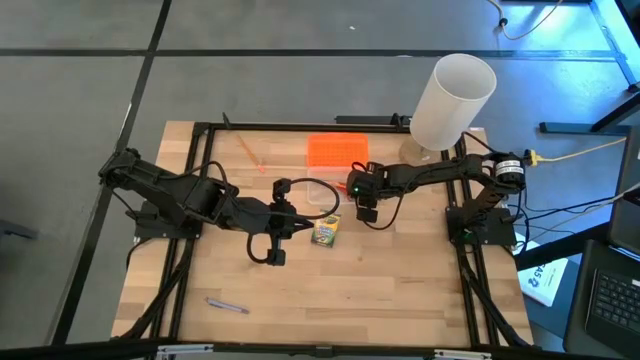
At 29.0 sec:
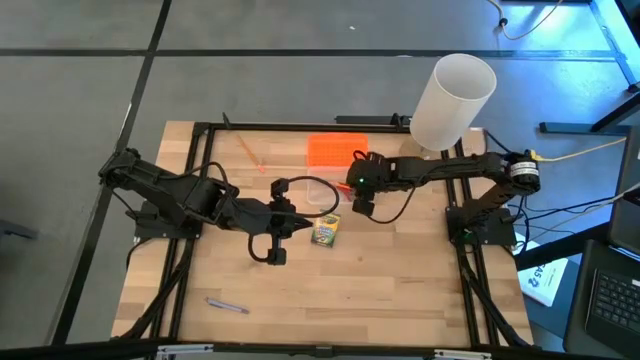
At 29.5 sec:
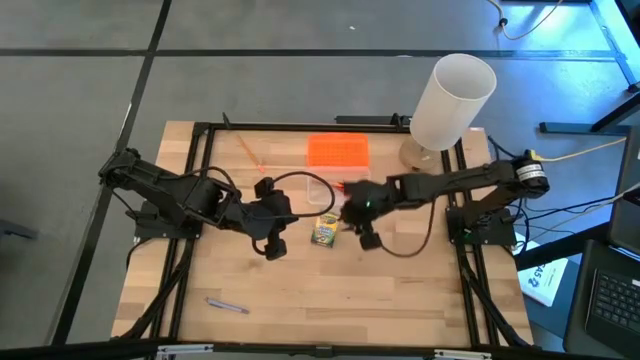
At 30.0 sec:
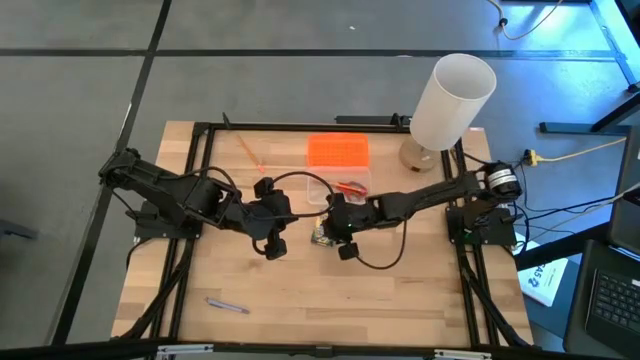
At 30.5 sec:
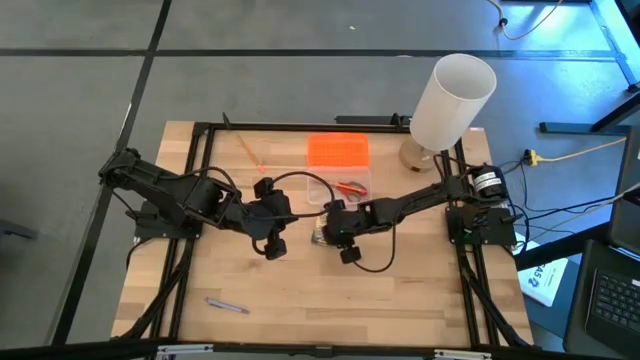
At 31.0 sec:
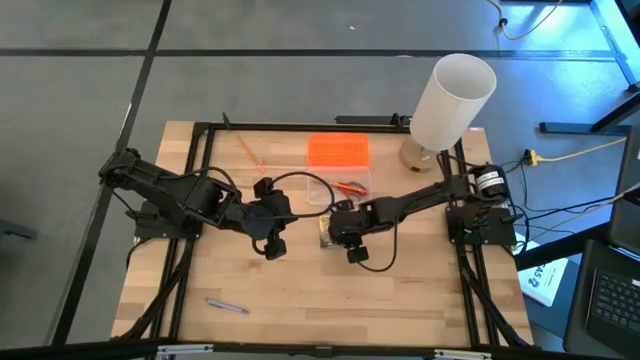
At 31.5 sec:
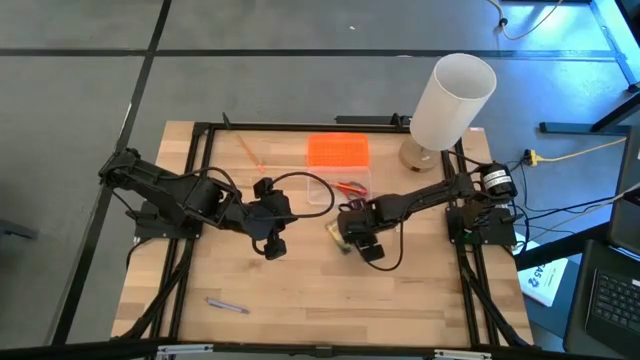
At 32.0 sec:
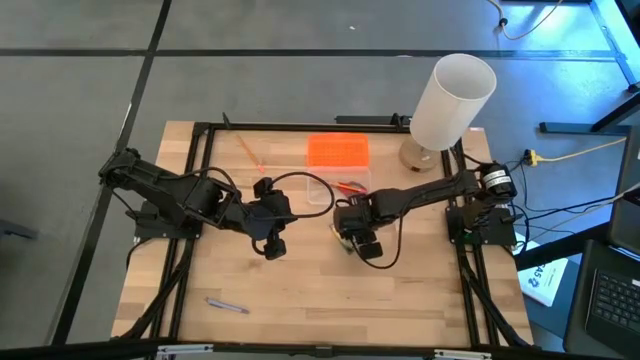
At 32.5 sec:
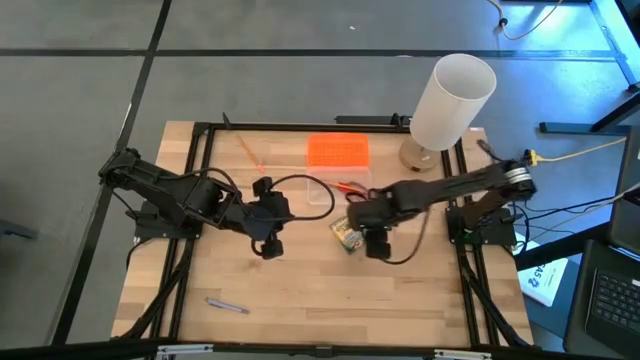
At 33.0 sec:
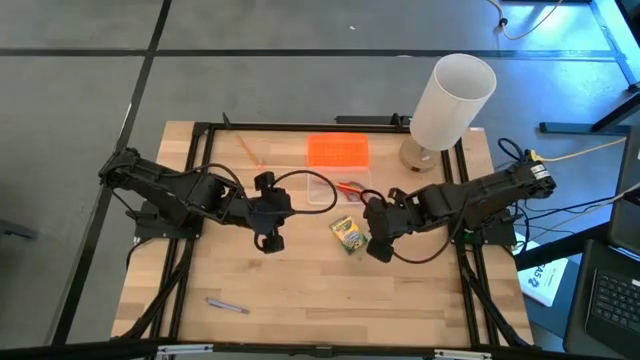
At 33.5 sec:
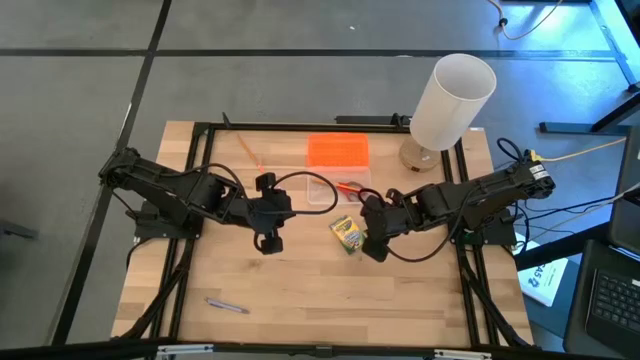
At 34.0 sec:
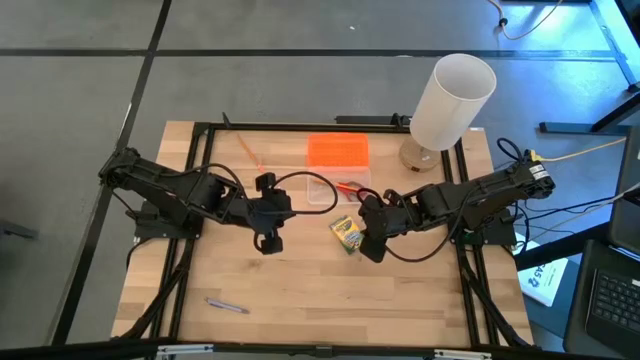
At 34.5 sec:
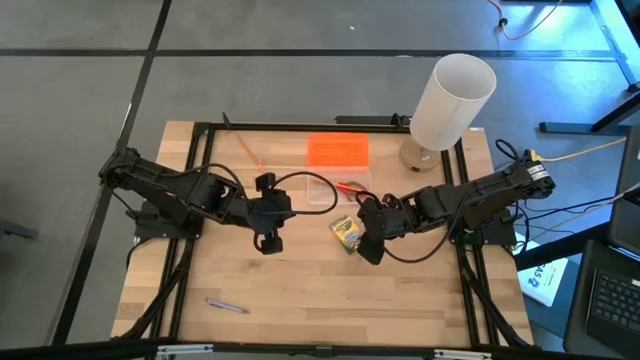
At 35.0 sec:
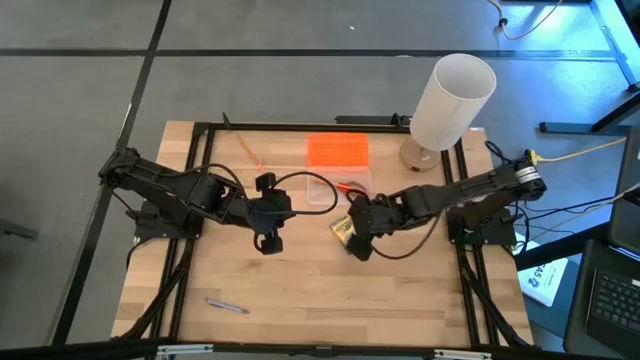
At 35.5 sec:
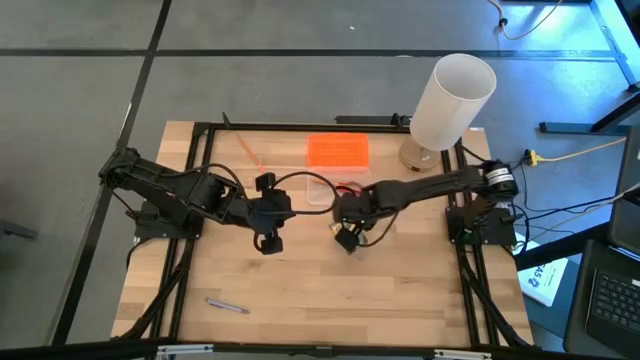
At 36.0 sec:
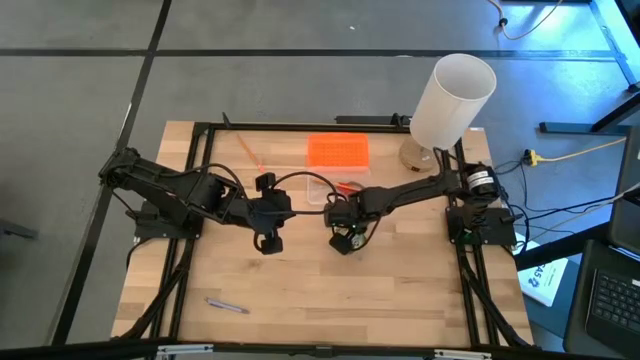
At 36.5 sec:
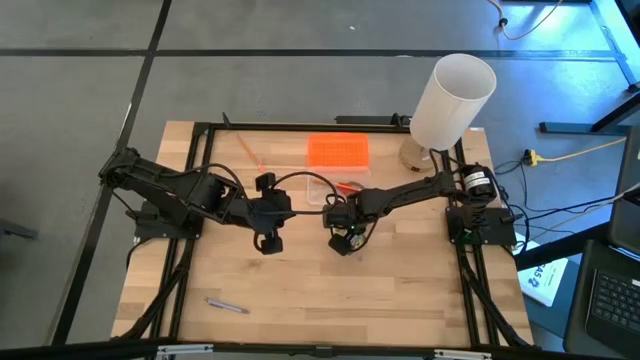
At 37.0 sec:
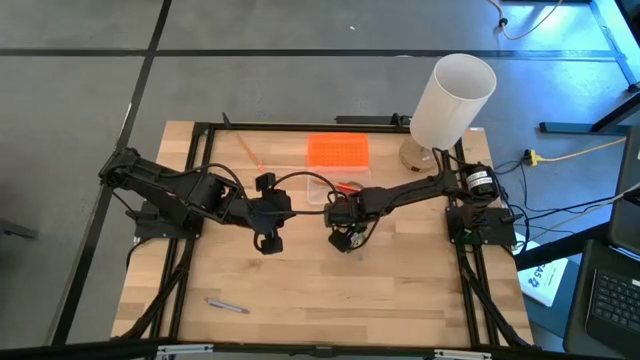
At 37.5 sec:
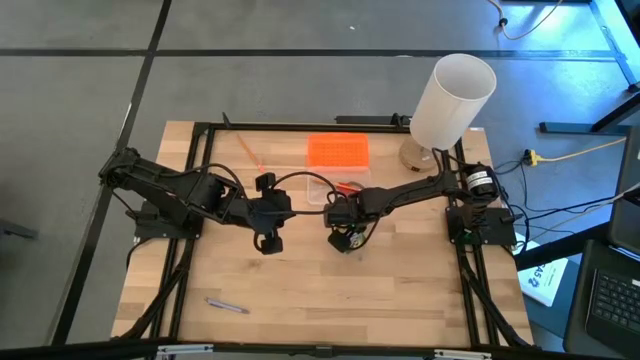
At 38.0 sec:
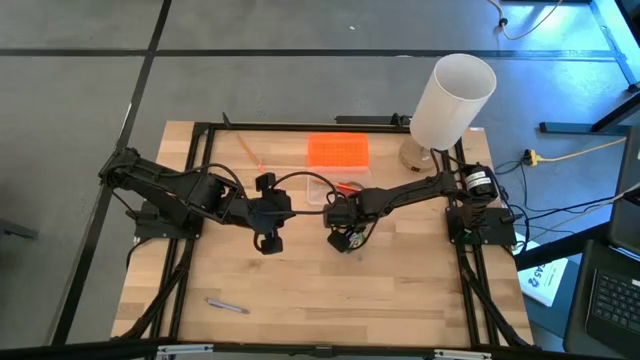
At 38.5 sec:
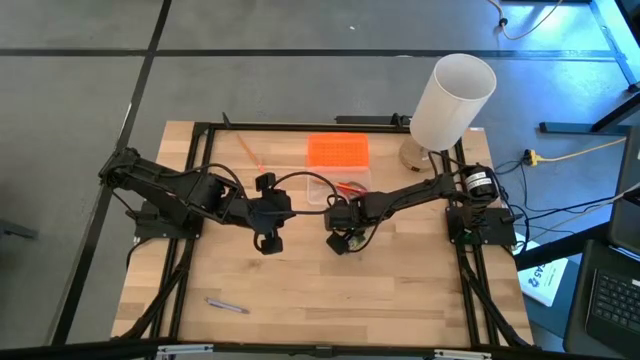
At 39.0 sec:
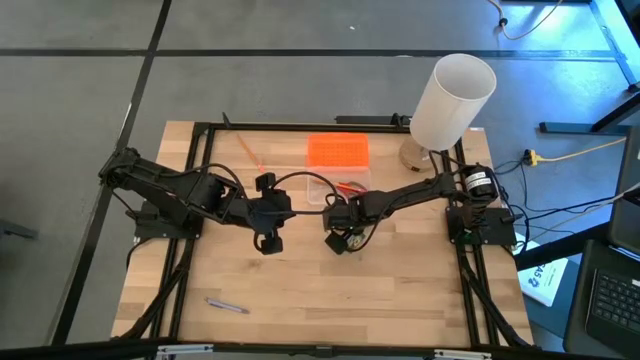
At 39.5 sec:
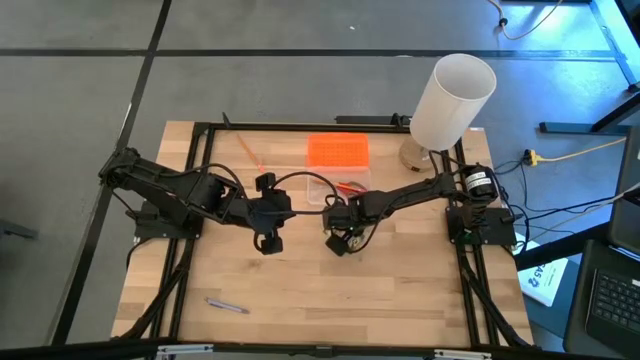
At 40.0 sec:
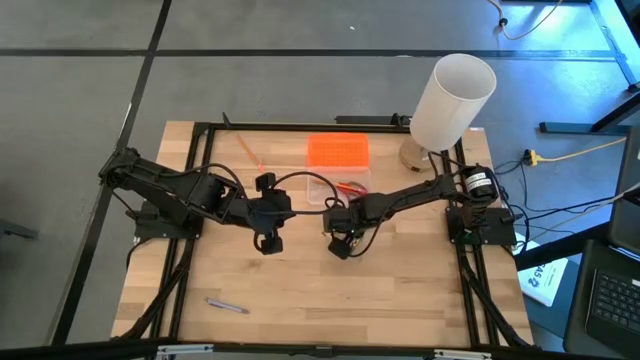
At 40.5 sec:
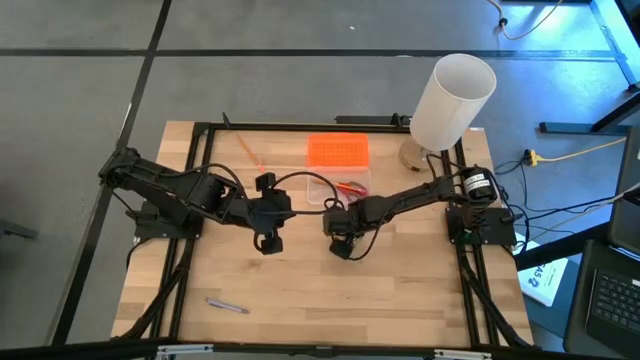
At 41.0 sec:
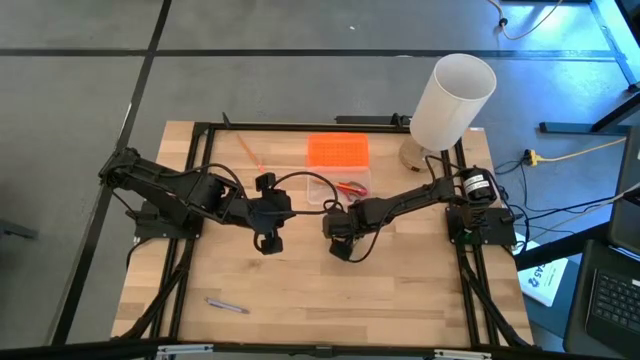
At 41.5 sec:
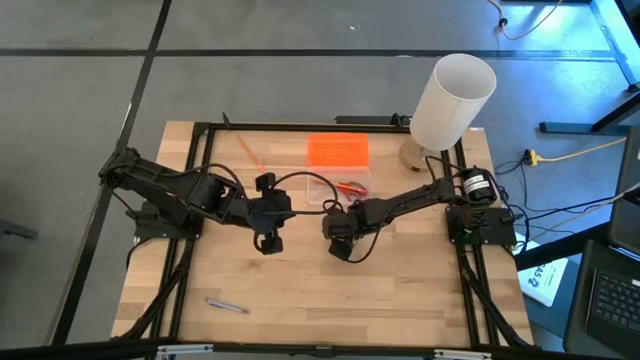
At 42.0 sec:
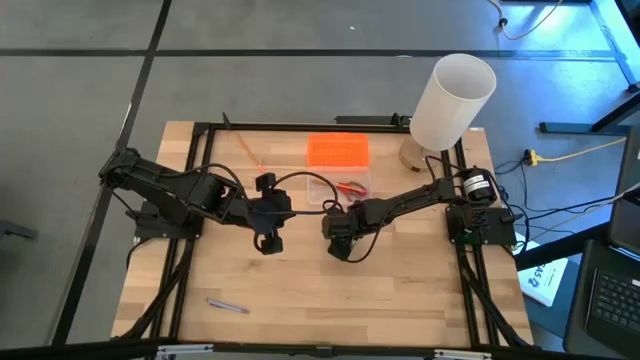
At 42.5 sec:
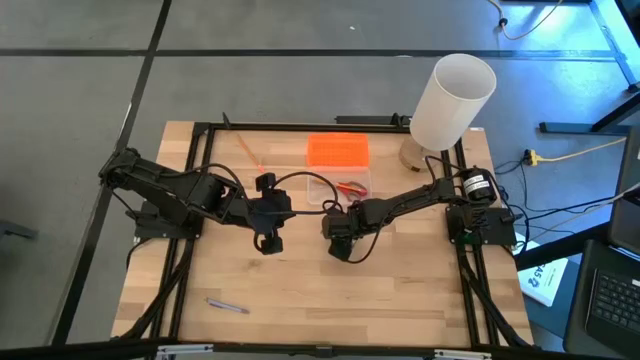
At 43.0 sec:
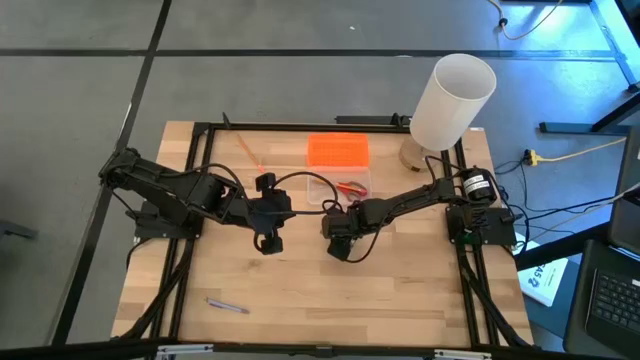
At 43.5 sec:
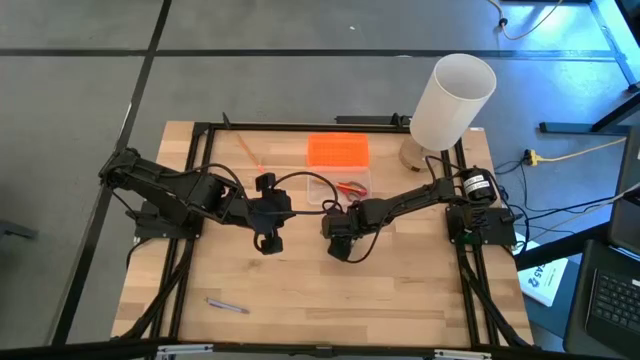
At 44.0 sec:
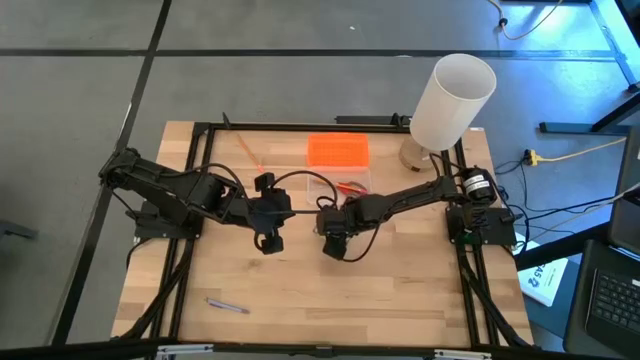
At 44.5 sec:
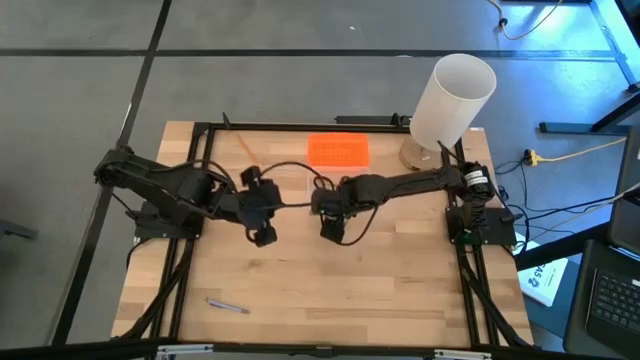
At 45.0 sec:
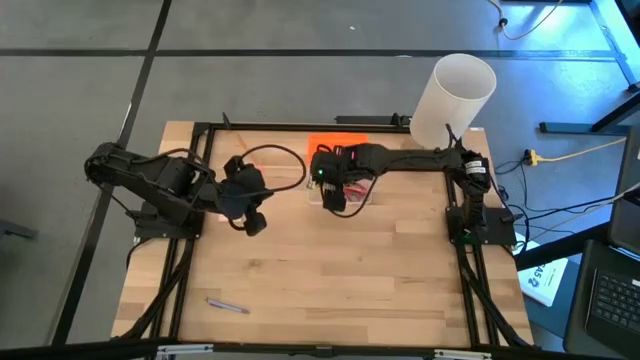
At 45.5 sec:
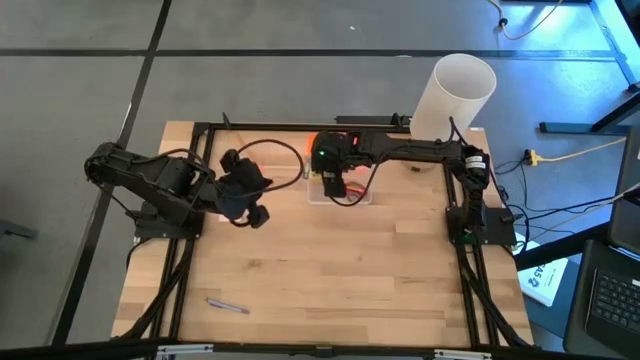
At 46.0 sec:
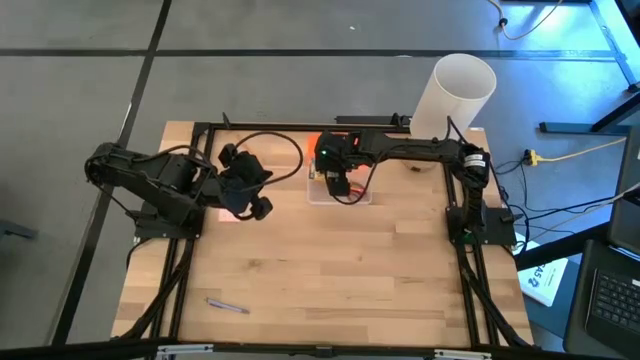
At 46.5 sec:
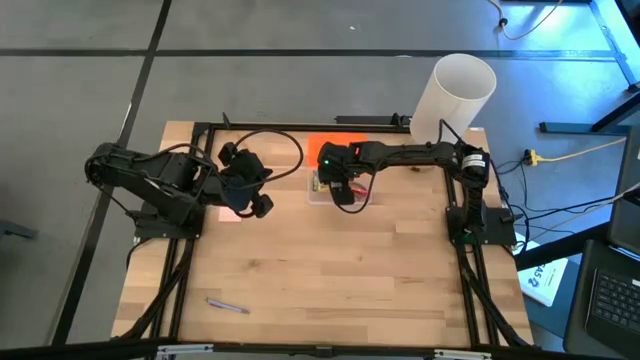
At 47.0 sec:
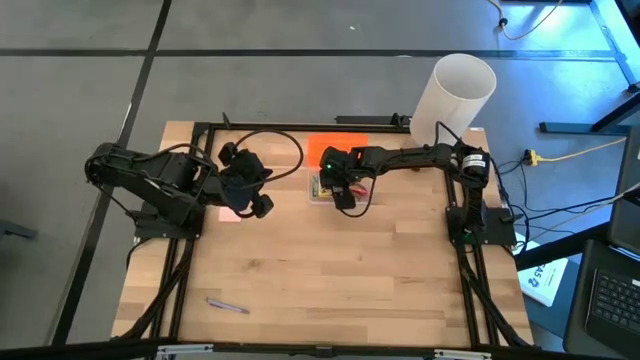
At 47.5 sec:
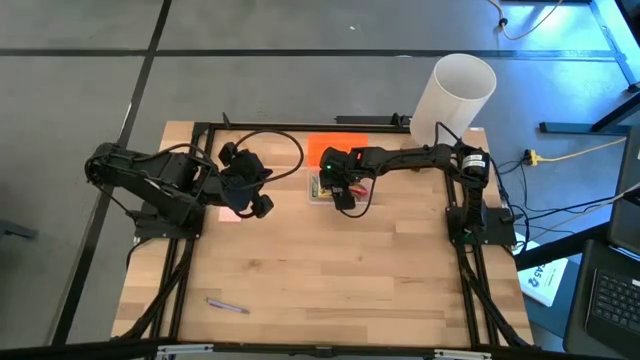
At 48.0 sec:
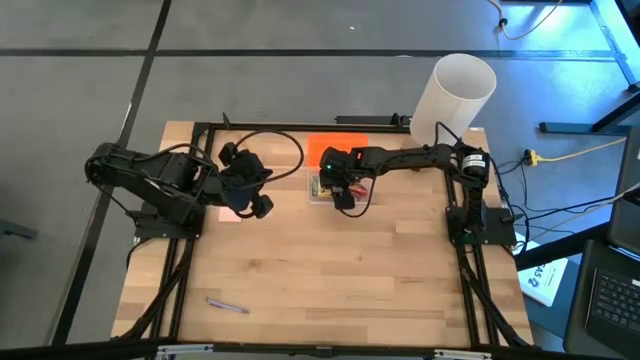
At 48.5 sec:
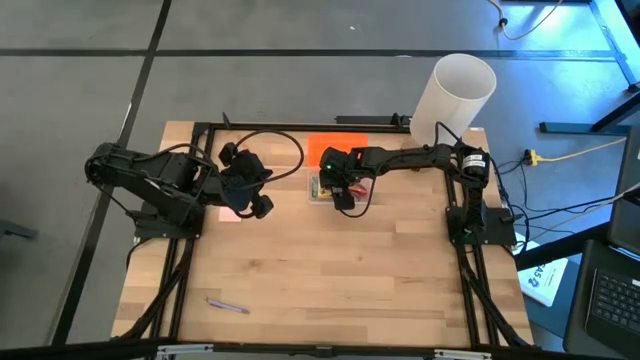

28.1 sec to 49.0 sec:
Task: Pack school essentials
Put the yellow crayon box into the orange supply box

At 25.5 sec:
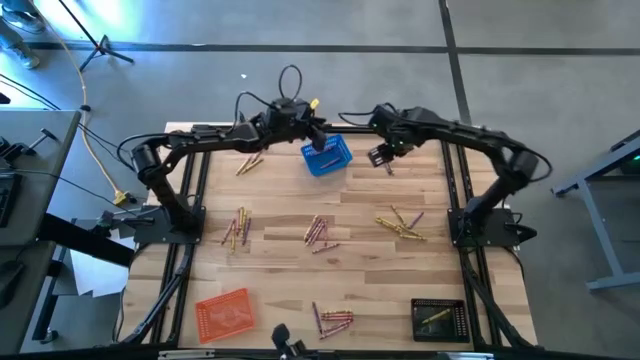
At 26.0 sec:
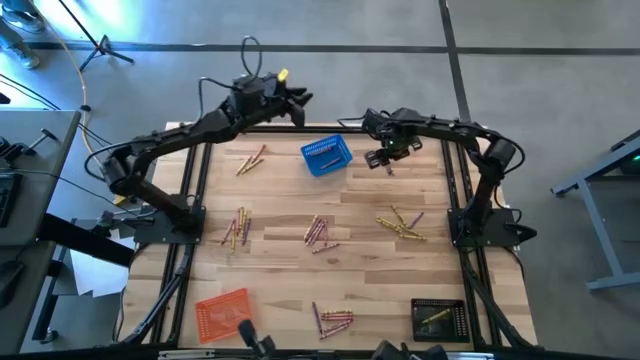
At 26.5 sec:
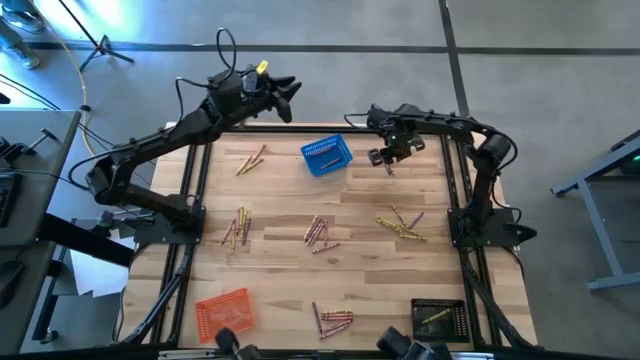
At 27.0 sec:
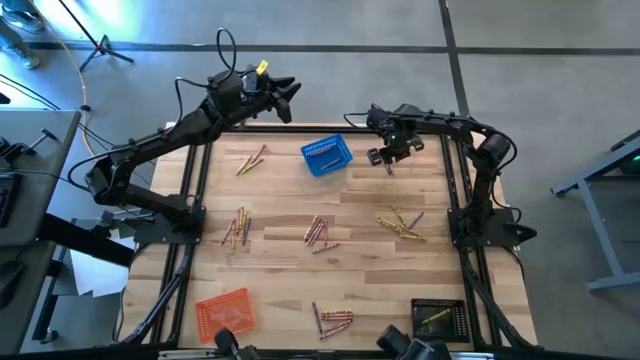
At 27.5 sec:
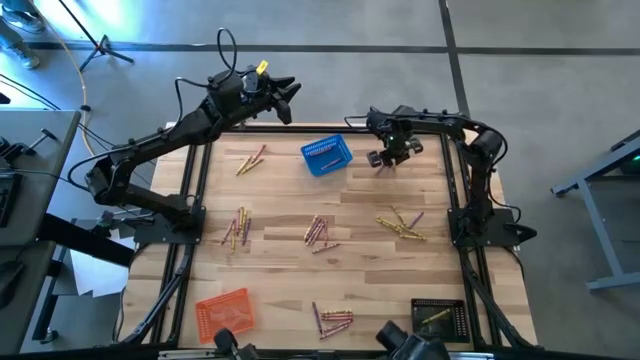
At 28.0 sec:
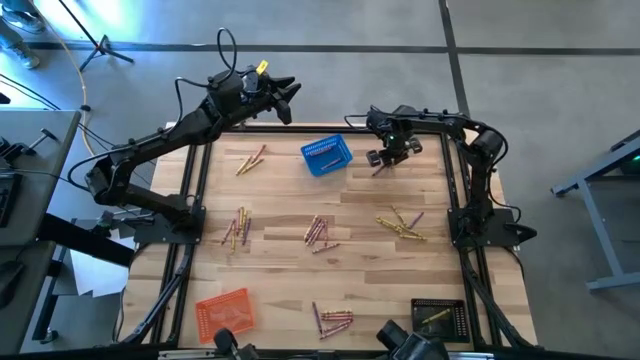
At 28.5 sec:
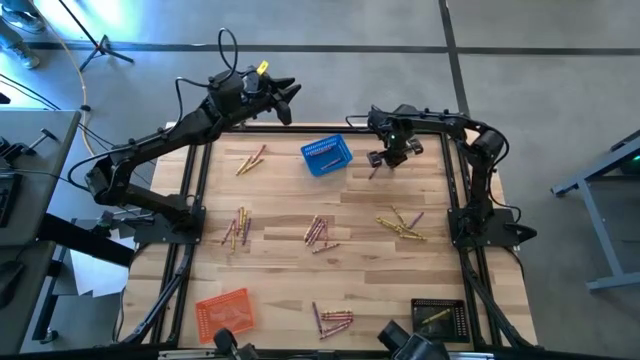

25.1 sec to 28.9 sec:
Task: Sort crayons
Put the yellow crayon into the black bin
